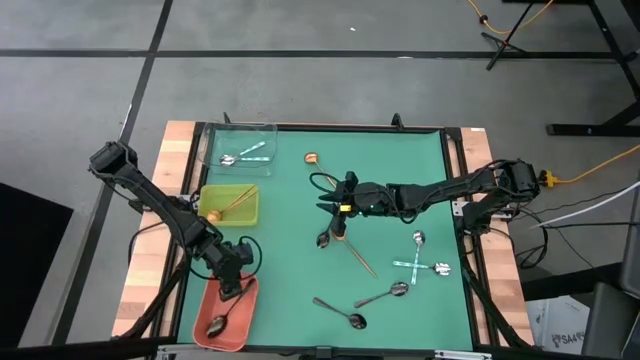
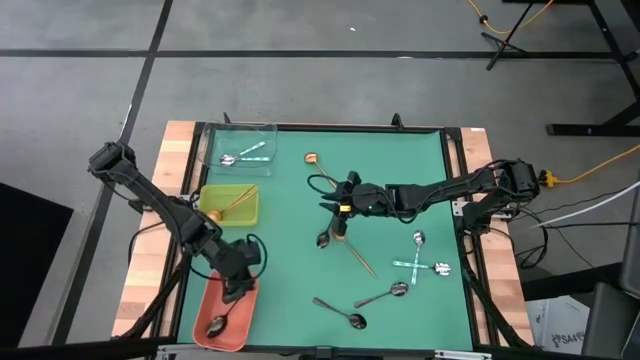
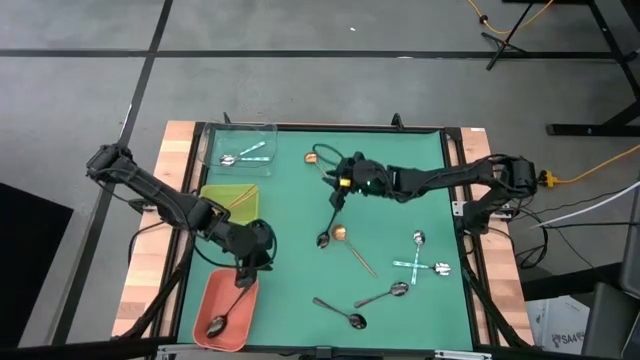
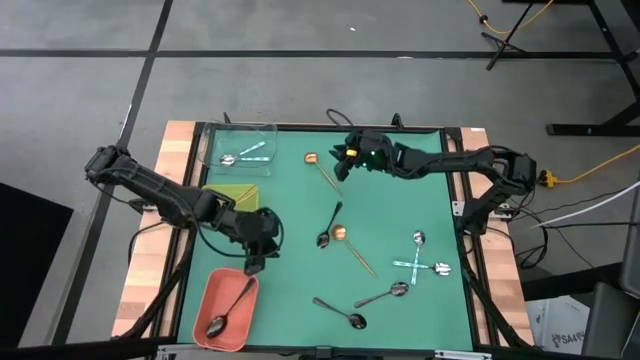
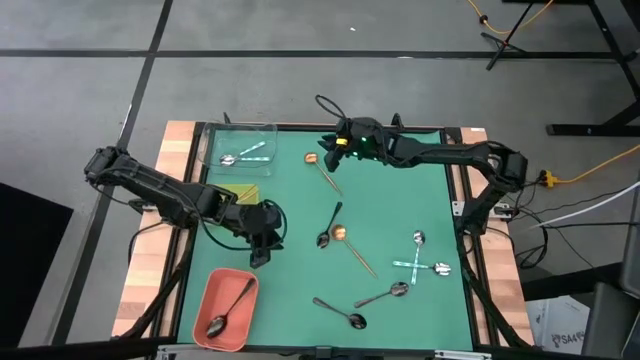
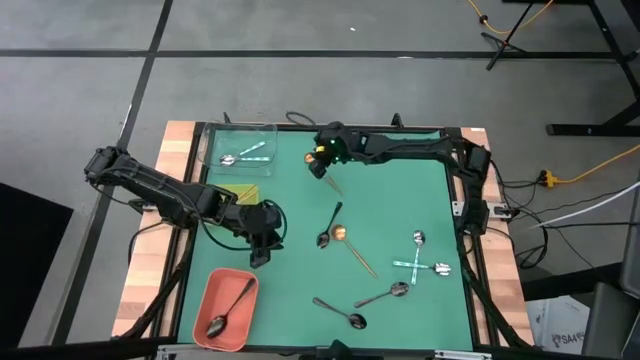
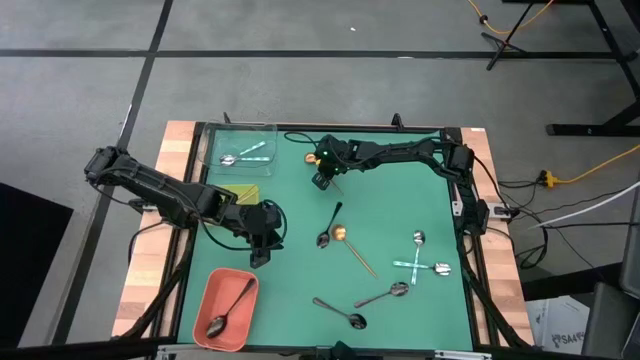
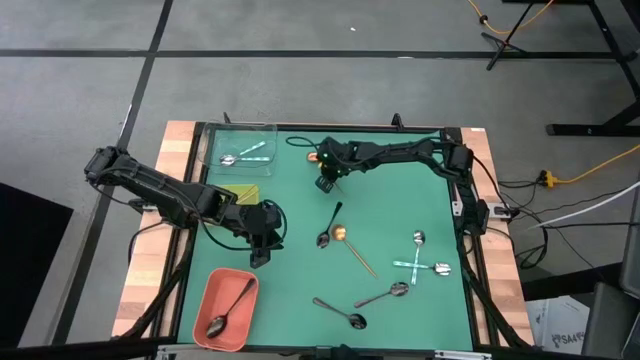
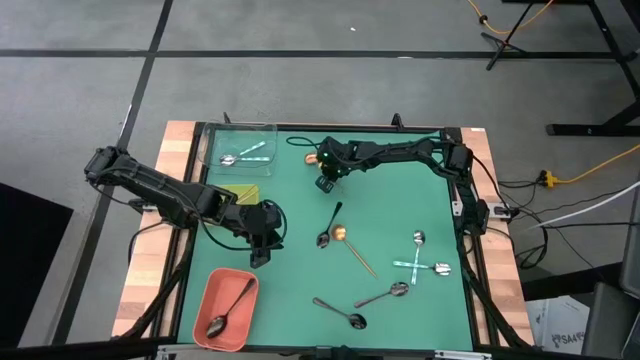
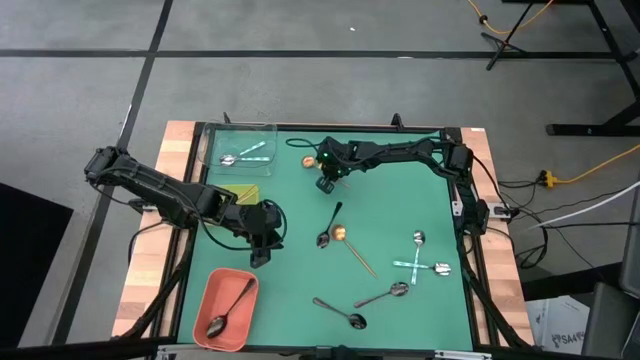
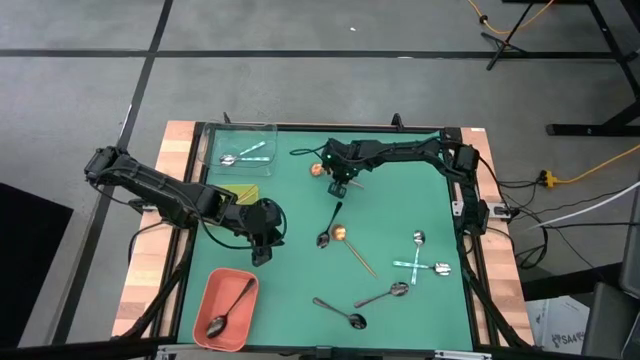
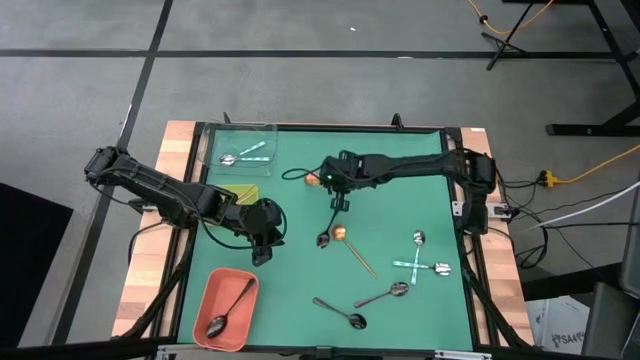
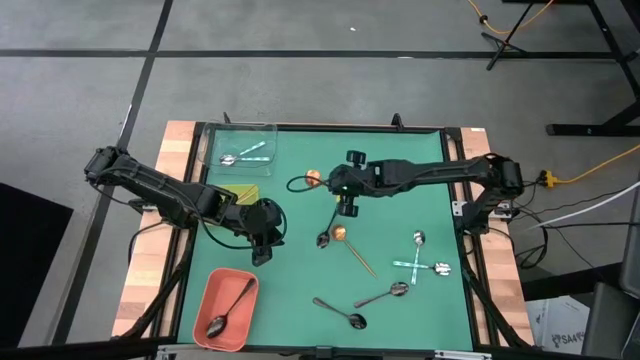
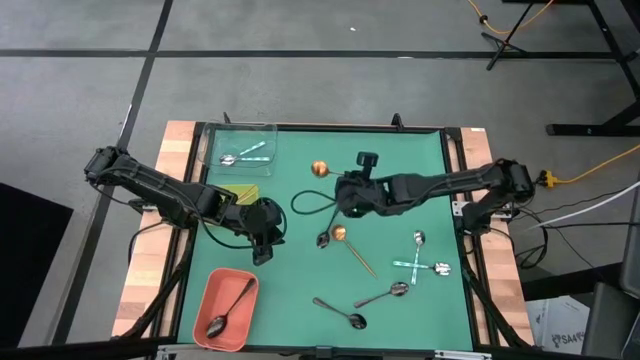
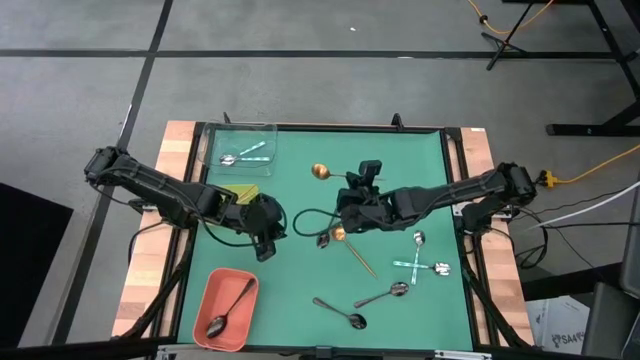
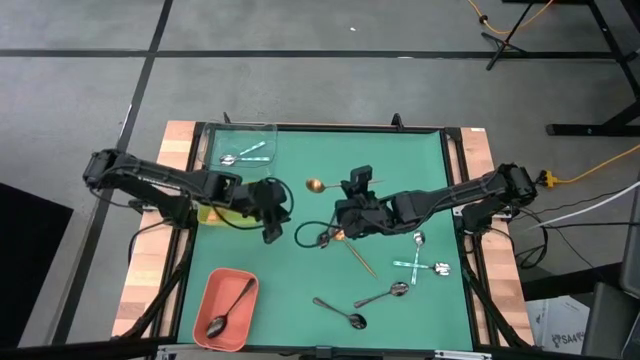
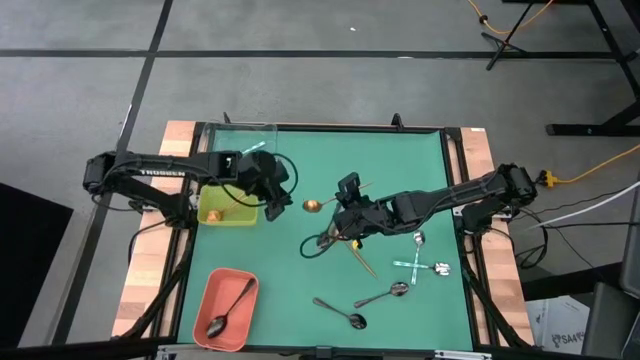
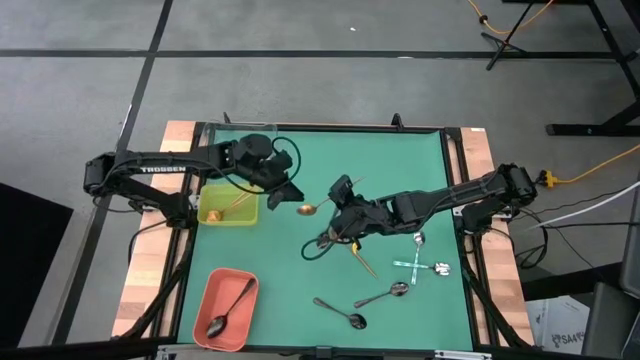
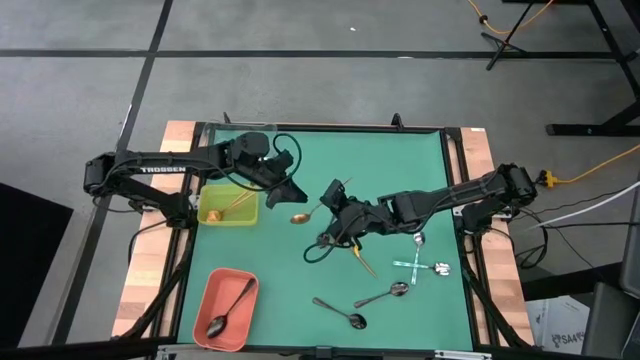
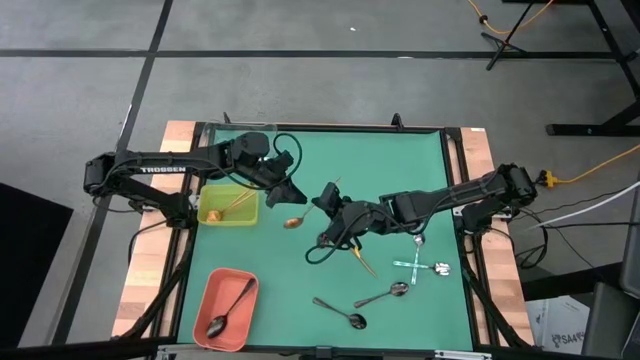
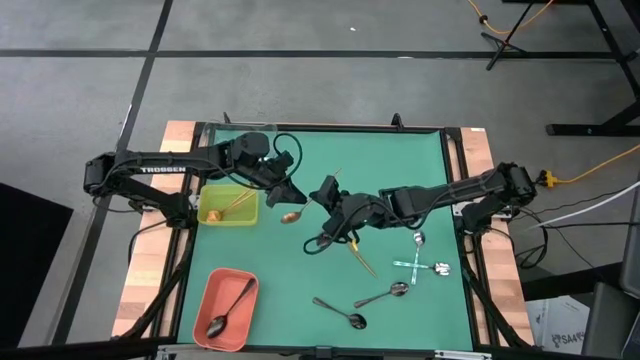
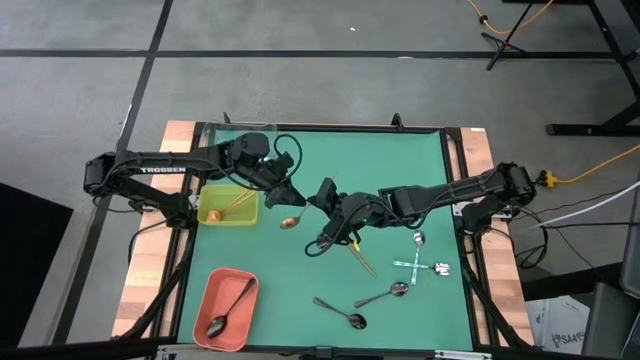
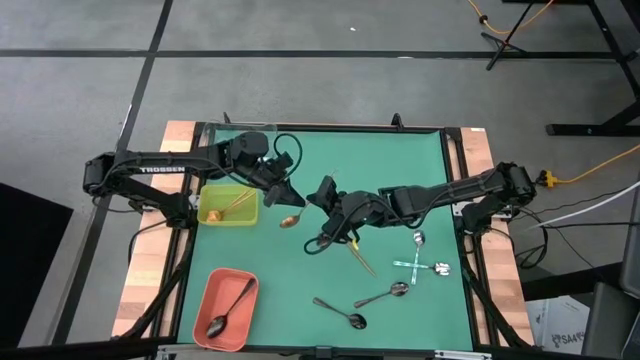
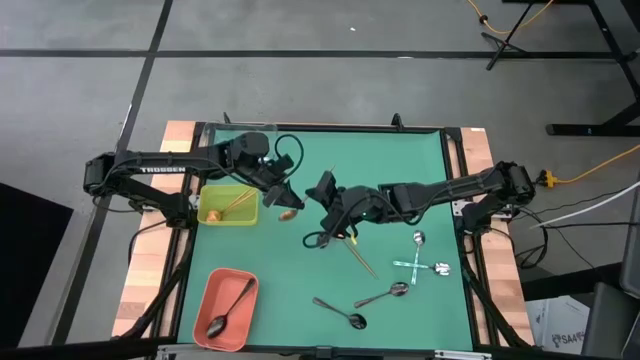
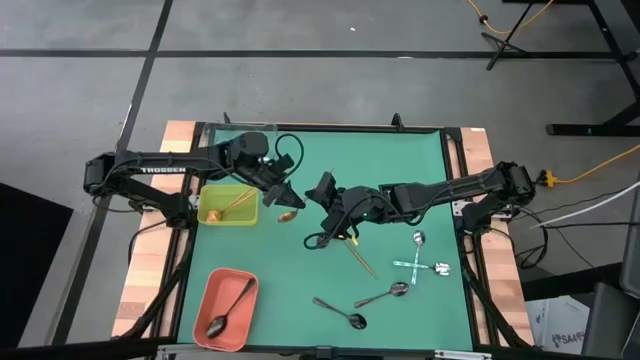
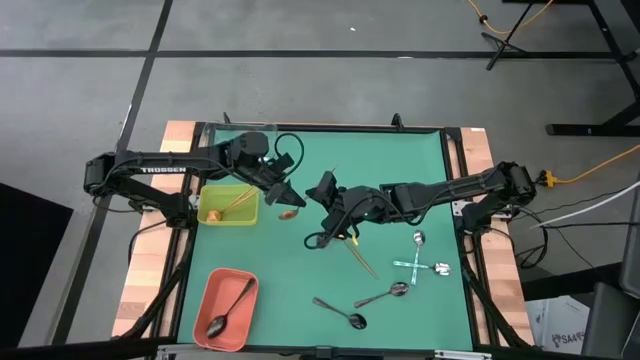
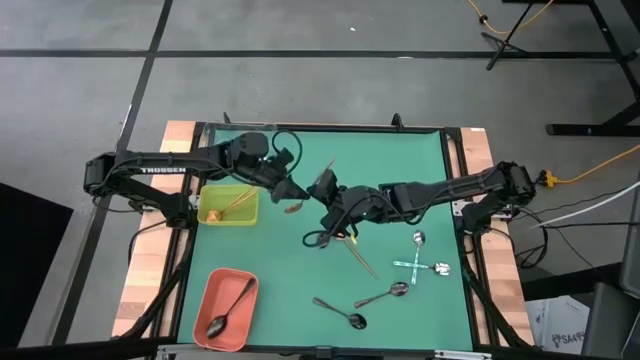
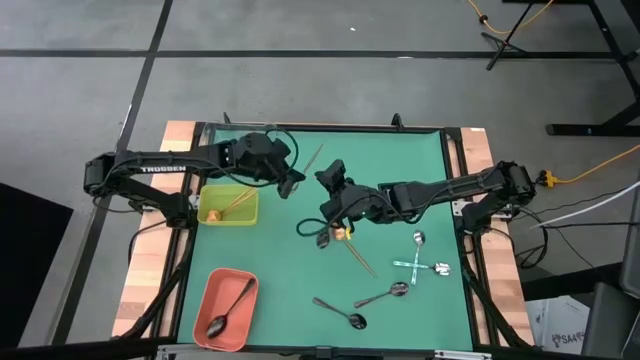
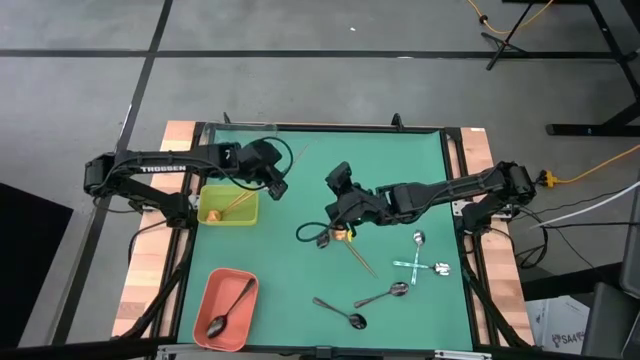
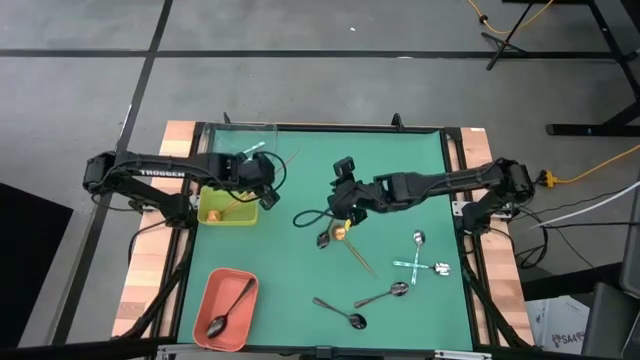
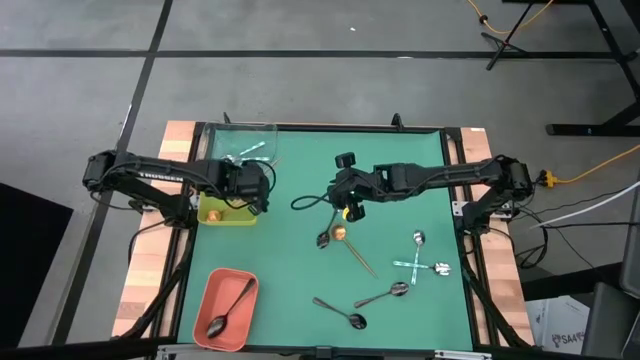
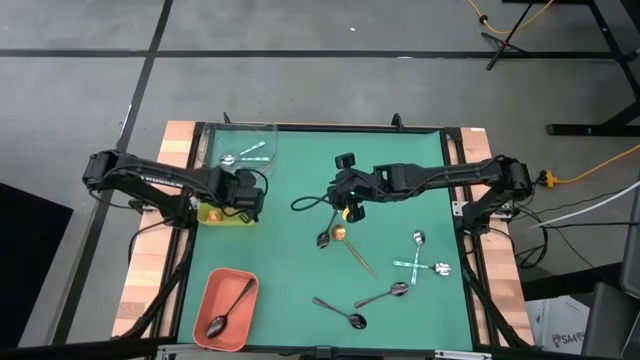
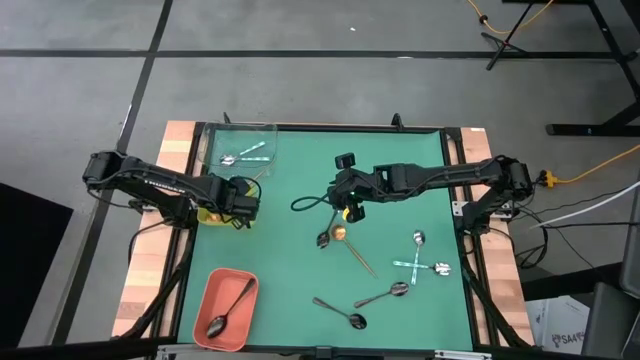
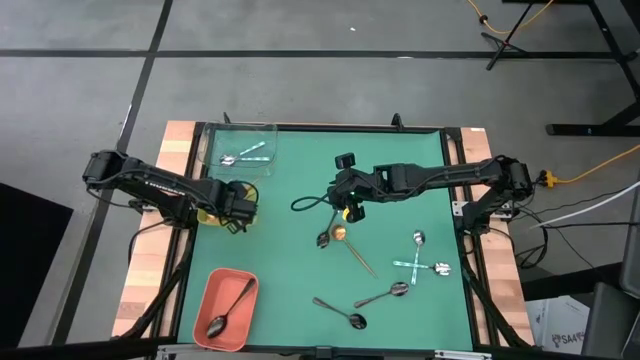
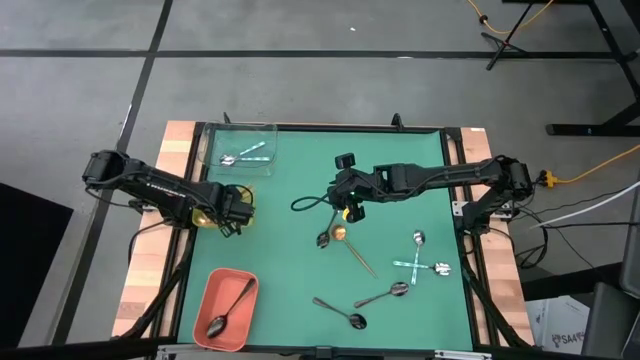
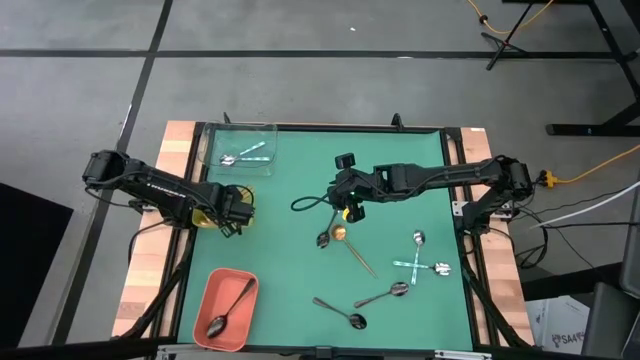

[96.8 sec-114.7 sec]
Task: Sort silverware by color (type)
Put the gold spoon into the yellow bin
